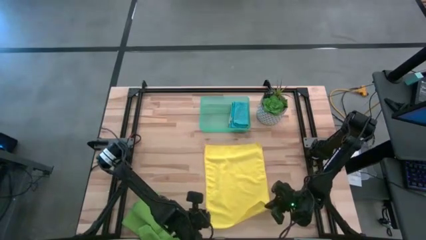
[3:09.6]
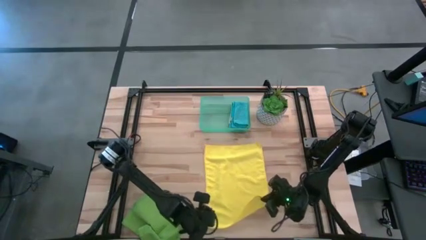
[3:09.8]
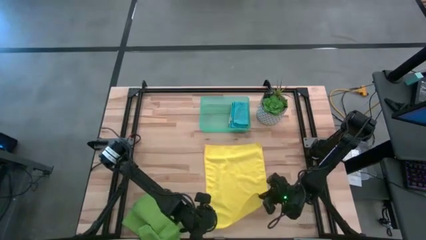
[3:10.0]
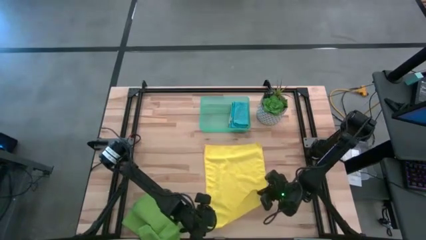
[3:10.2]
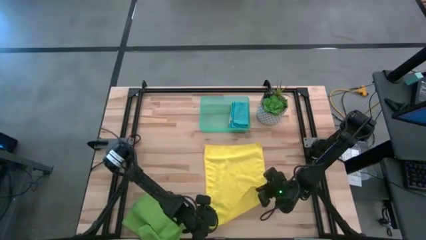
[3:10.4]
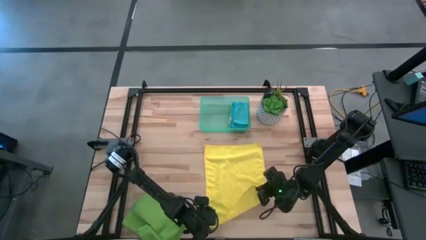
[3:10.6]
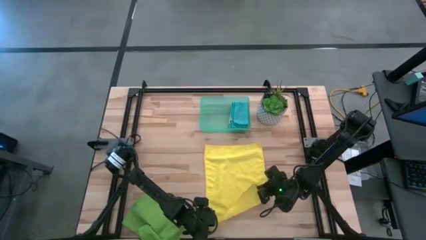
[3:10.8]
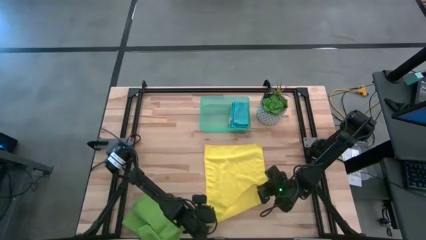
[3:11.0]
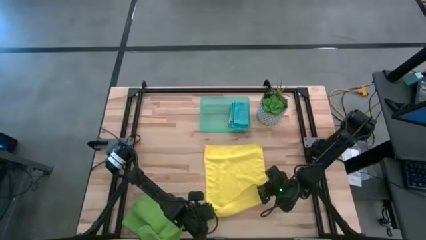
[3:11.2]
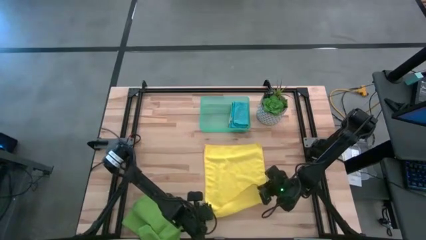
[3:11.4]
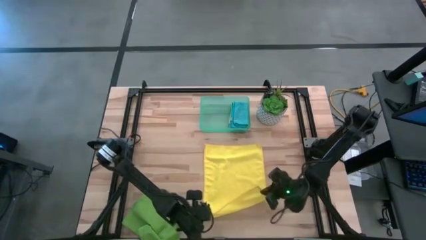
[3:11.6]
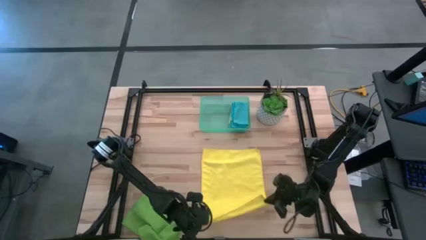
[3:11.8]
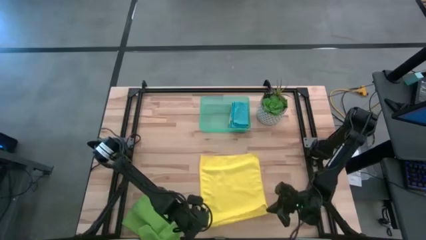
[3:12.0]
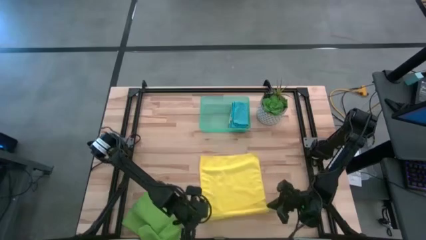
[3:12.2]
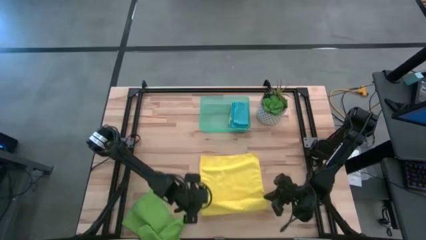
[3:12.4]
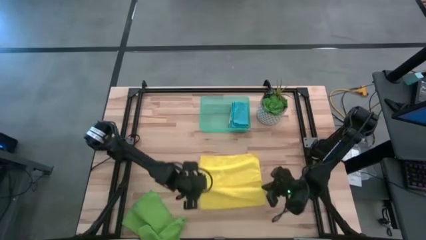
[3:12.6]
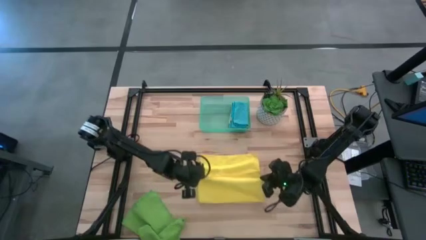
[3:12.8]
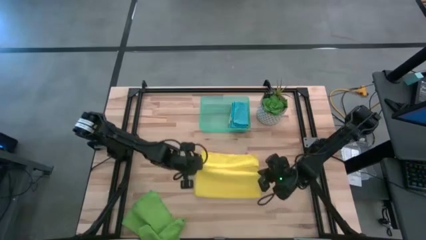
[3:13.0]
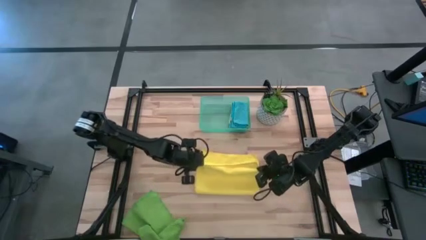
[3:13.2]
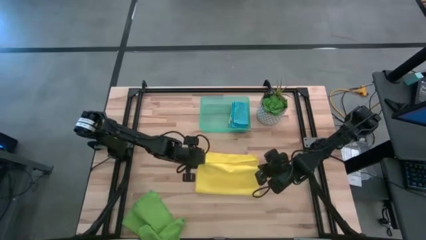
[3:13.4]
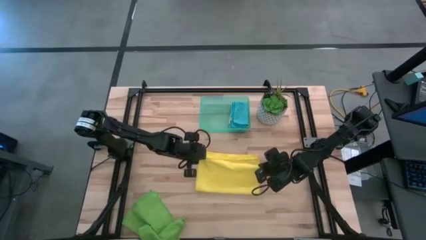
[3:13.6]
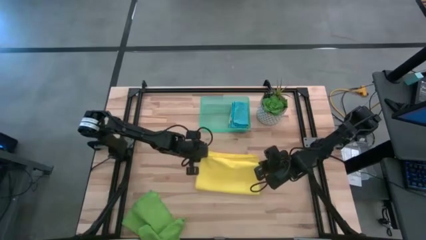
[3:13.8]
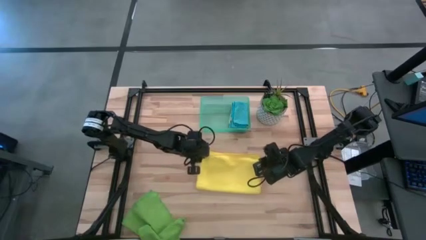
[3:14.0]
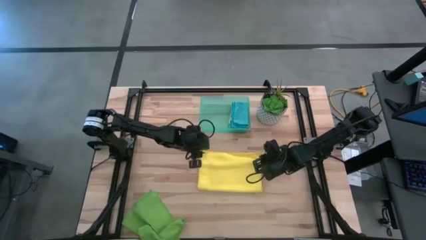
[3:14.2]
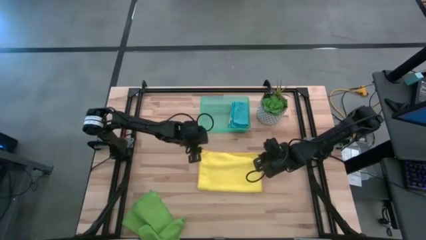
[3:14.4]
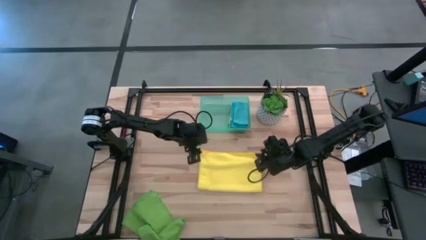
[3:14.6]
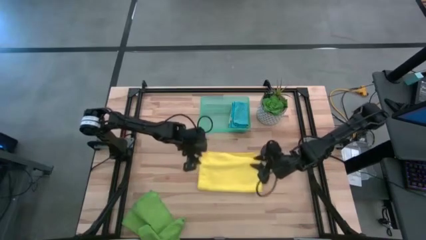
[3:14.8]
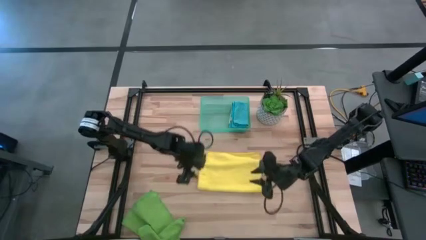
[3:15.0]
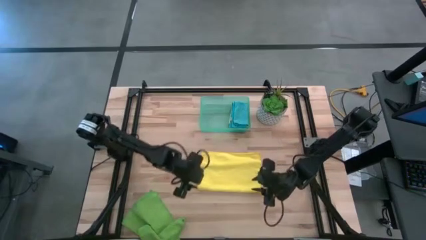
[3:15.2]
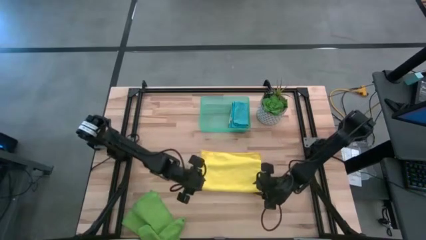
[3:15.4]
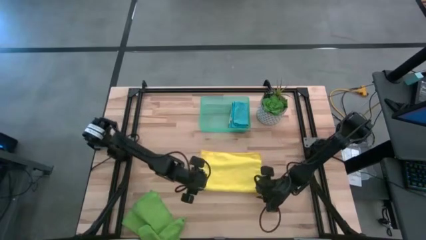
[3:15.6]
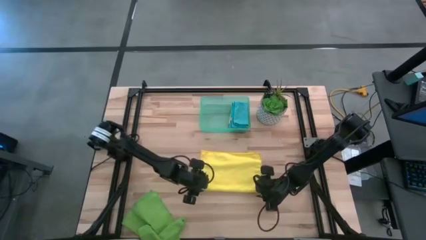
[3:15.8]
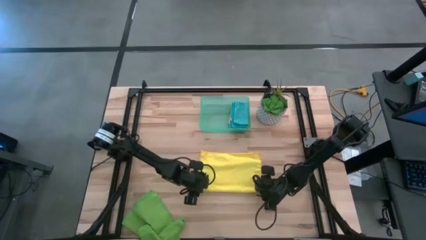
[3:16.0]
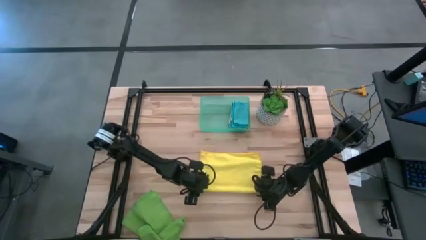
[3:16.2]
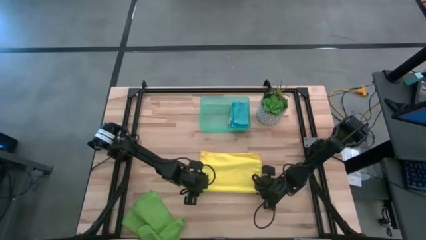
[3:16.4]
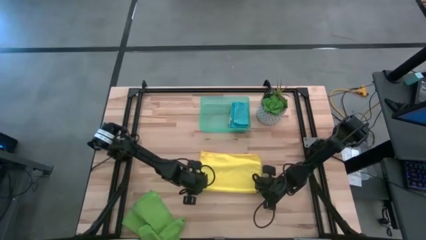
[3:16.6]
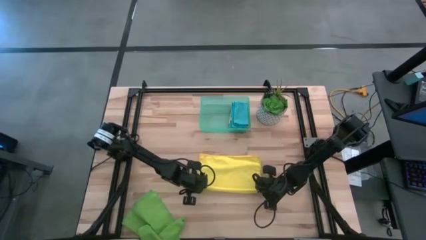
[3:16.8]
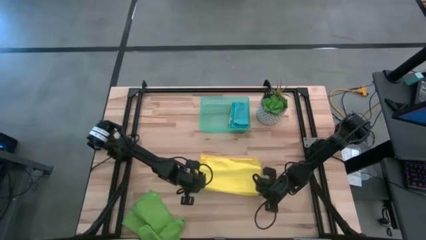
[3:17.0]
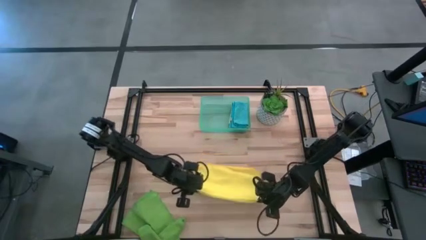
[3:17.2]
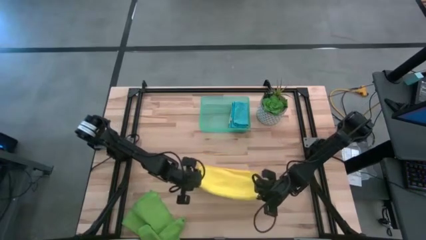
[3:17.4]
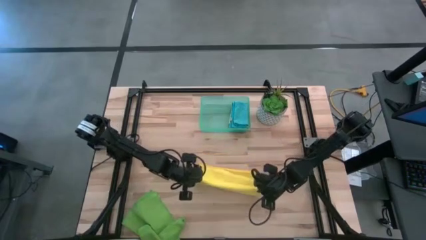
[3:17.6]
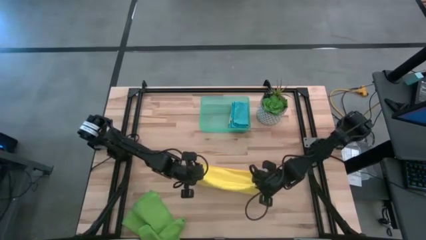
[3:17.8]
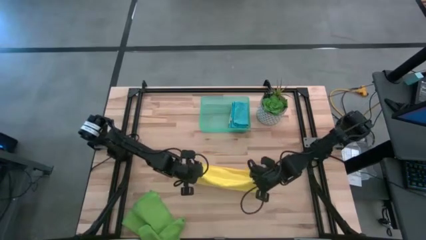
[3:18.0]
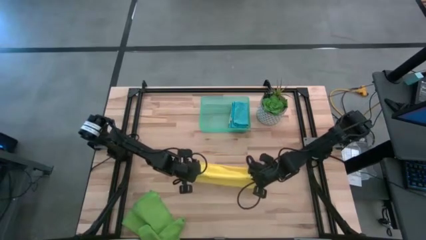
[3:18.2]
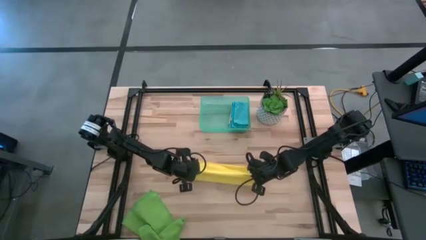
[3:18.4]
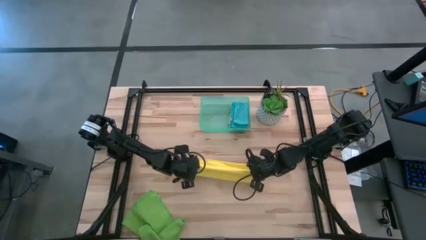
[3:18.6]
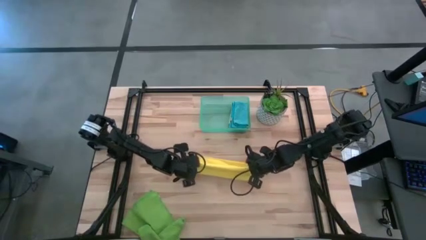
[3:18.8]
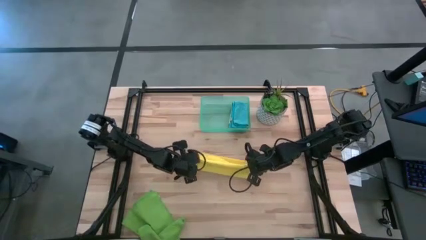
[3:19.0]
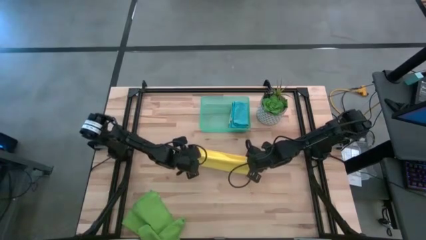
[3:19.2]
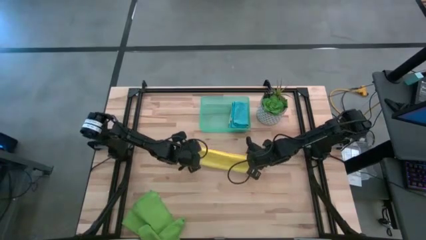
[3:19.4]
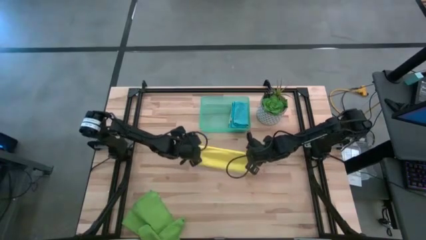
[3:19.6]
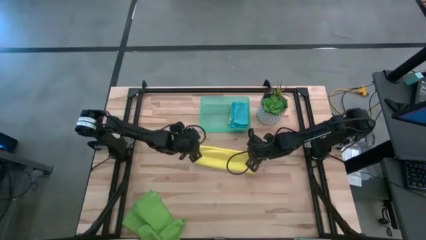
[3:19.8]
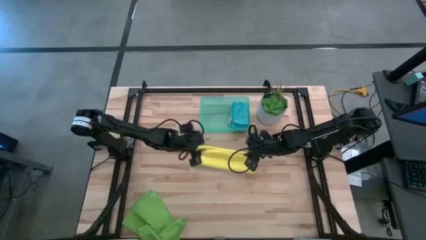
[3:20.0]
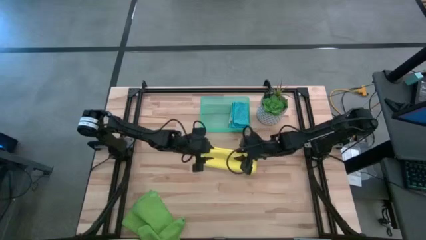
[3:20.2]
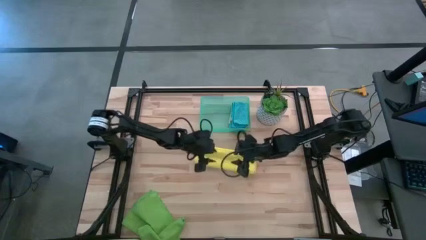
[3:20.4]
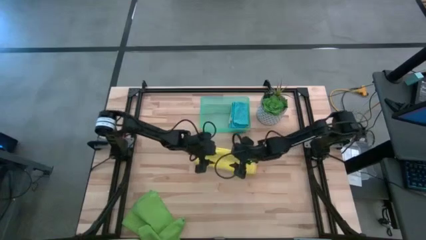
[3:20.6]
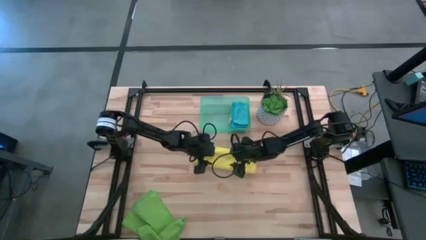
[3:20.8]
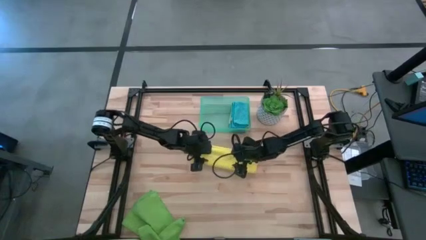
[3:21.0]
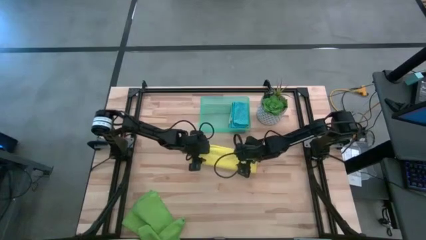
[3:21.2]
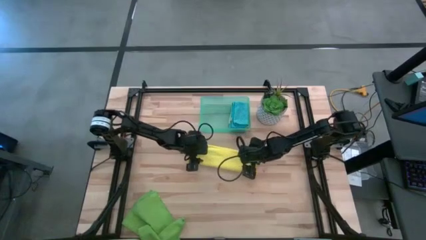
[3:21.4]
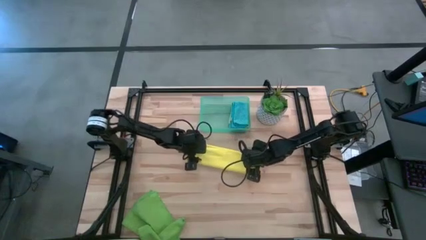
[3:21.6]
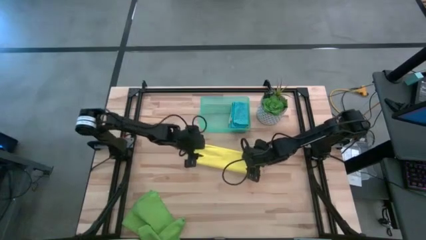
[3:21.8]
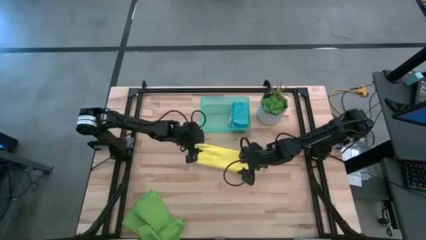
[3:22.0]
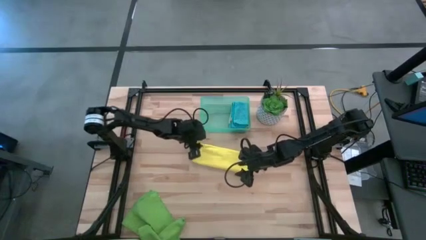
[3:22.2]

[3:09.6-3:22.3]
Task: Fold microfiber towels
Fold the yellow microfiber cloth

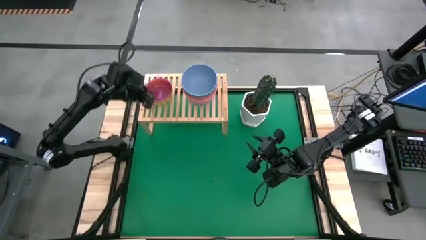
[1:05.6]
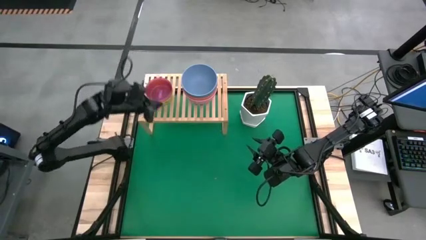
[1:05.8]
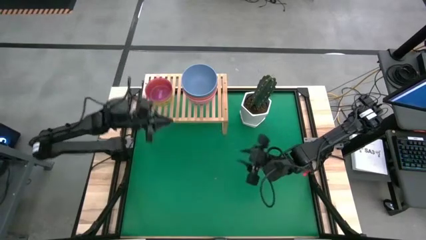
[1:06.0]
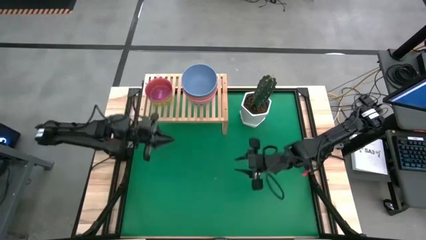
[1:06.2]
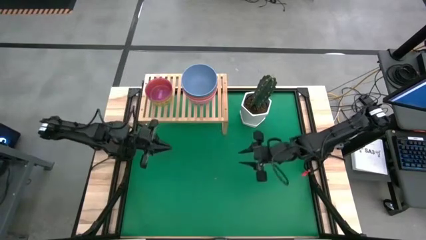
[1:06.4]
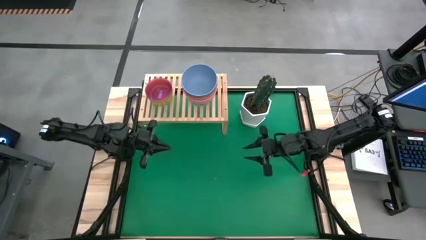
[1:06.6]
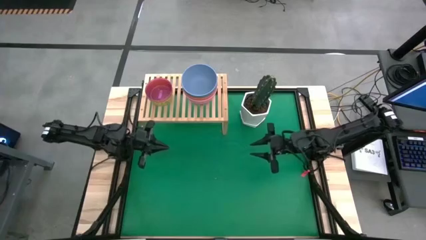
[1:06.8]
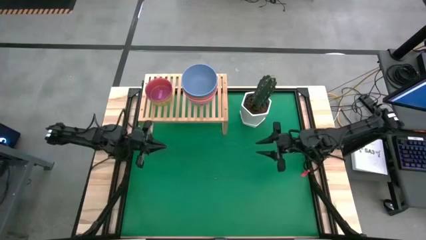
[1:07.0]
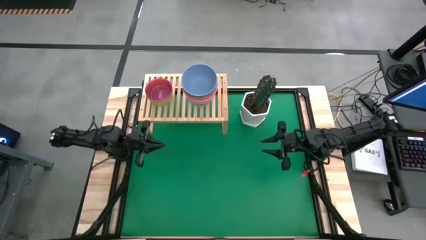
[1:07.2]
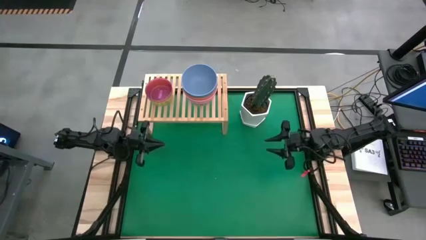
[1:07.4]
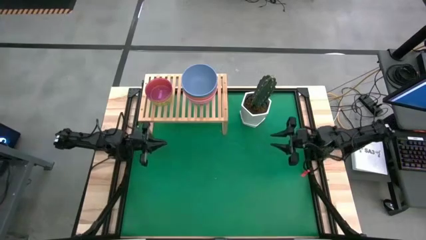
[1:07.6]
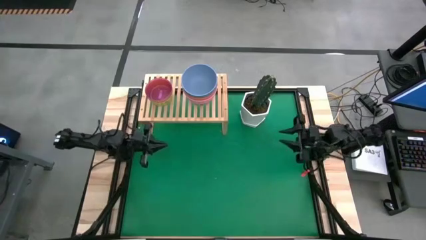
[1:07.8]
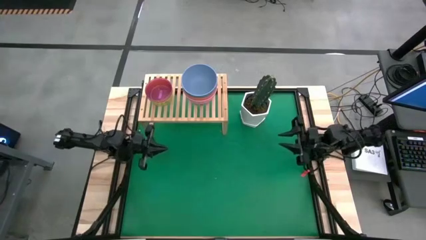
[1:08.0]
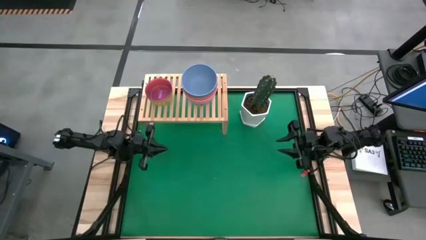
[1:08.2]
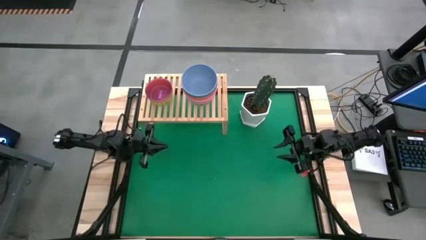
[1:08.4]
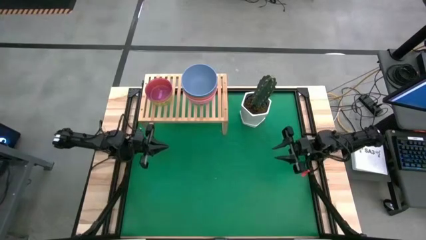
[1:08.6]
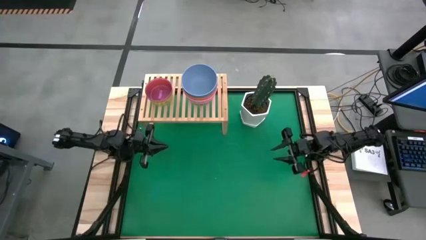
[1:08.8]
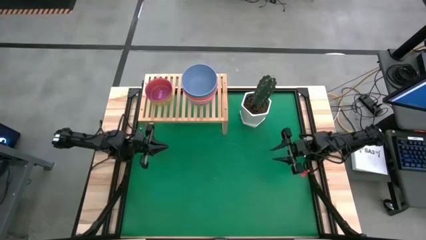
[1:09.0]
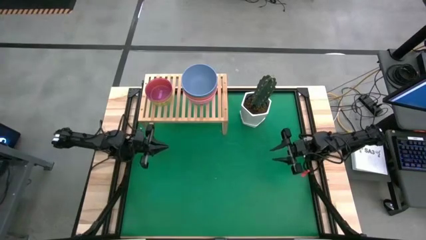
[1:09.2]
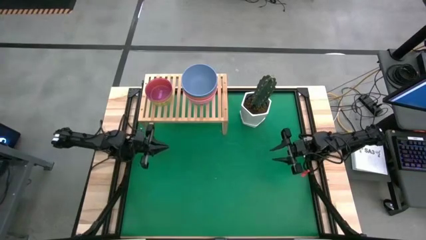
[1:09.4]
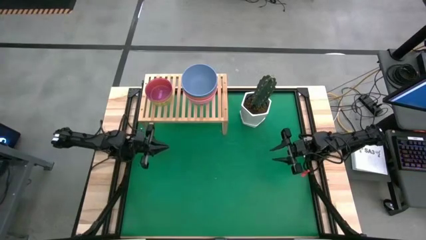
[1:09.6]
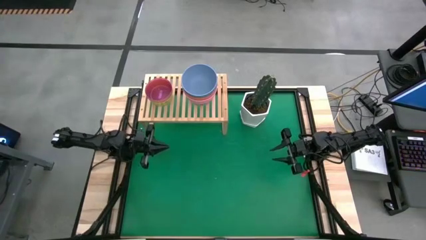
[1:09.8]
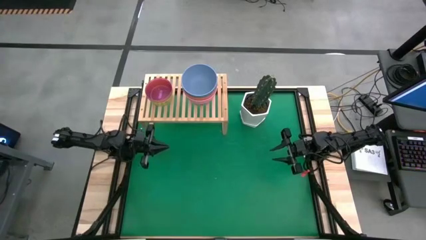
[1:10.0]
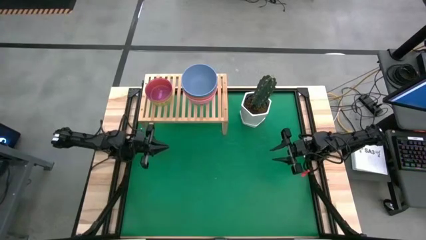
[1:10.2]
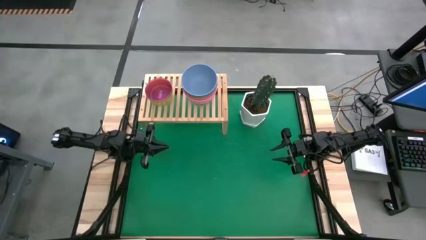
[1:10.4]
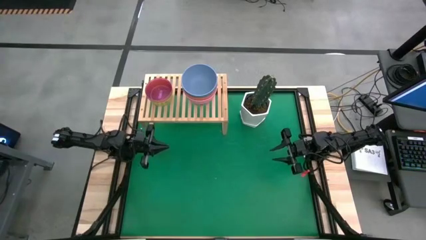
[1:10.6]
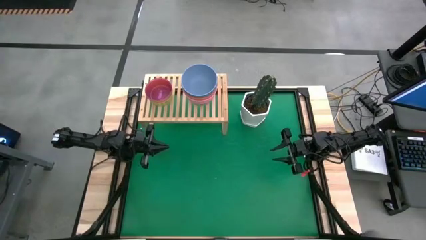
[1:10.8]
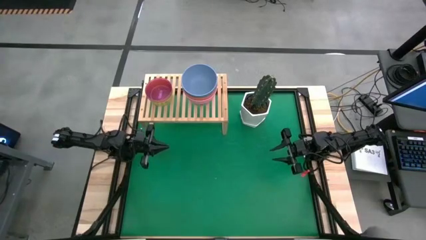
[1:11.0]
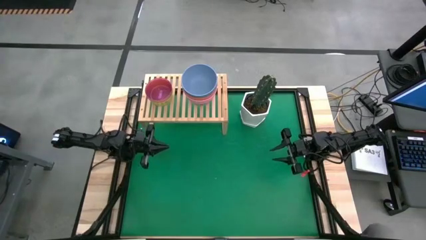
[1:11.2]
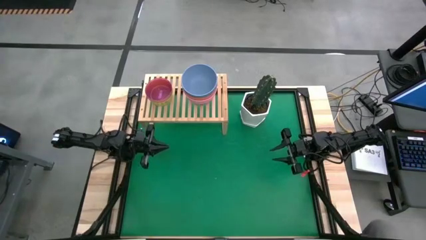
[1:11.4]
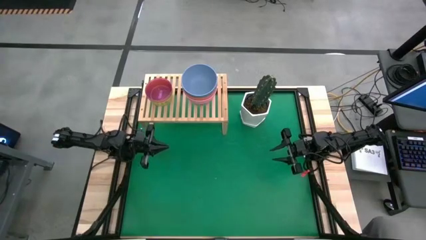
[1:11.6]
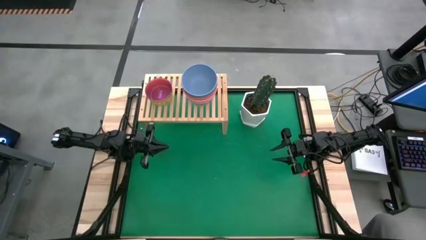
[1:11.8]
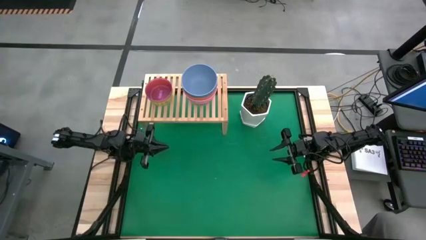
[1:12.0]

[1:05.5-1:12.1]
Task: Place and stack bowls onto a shelf
Return to Home Position
